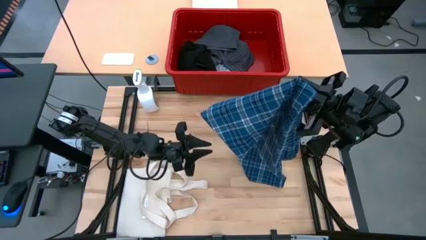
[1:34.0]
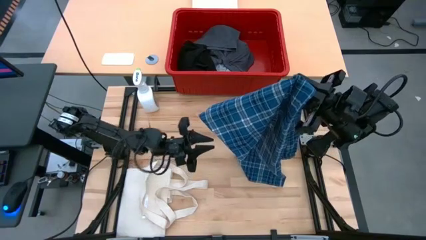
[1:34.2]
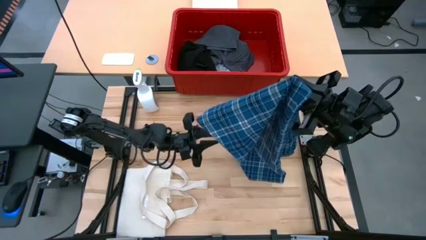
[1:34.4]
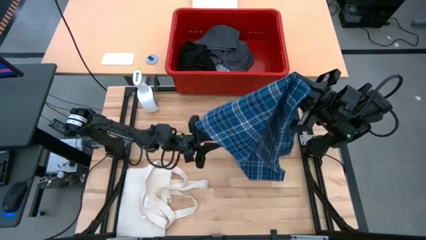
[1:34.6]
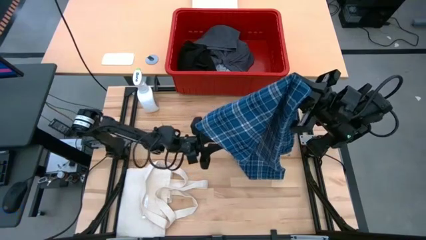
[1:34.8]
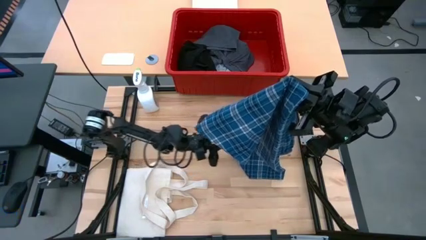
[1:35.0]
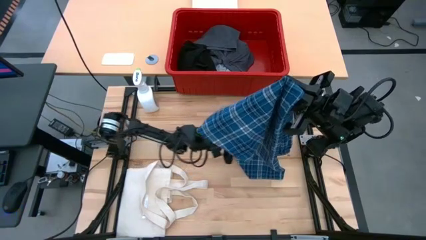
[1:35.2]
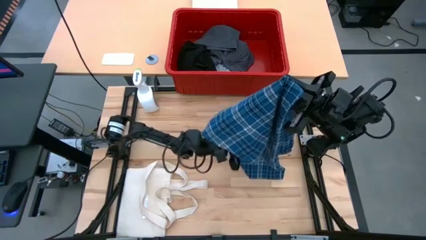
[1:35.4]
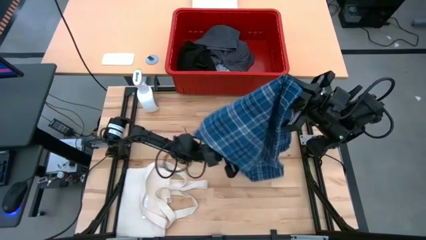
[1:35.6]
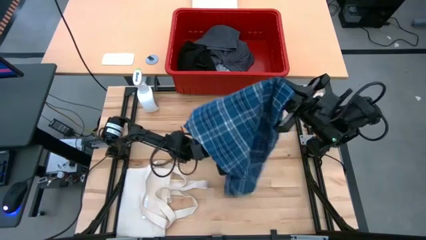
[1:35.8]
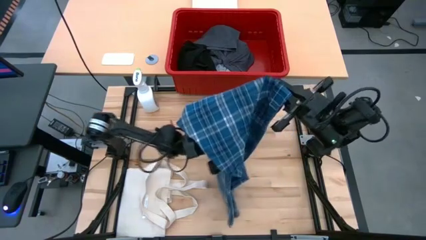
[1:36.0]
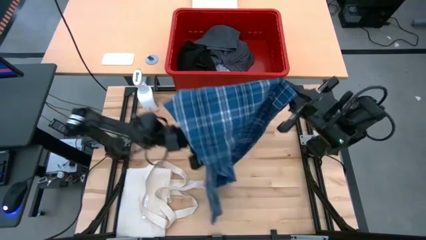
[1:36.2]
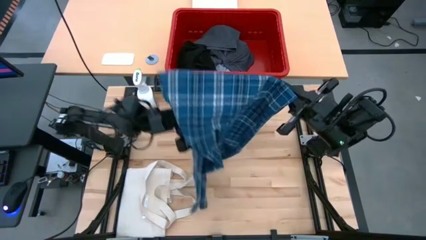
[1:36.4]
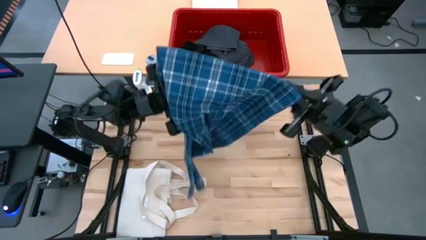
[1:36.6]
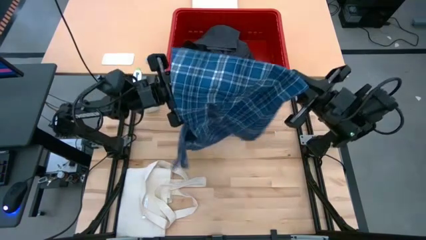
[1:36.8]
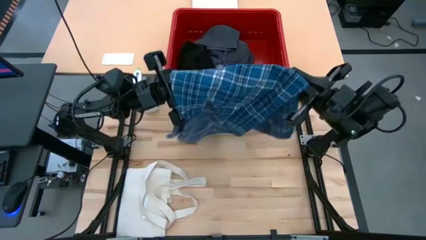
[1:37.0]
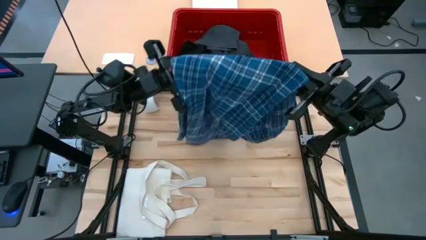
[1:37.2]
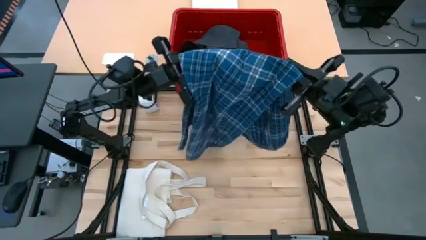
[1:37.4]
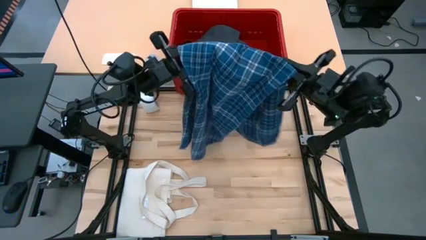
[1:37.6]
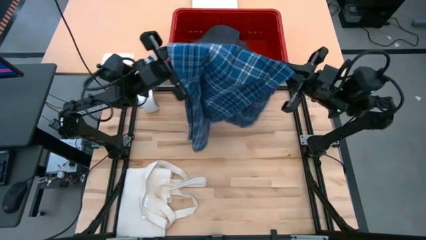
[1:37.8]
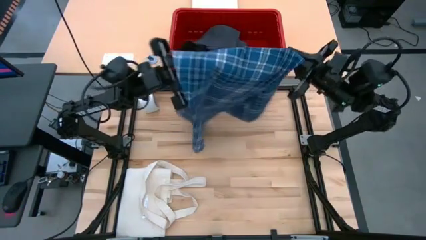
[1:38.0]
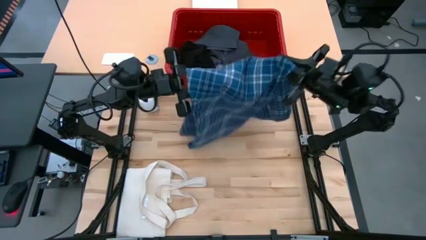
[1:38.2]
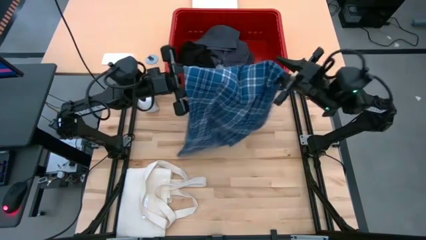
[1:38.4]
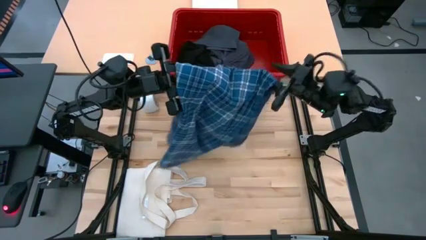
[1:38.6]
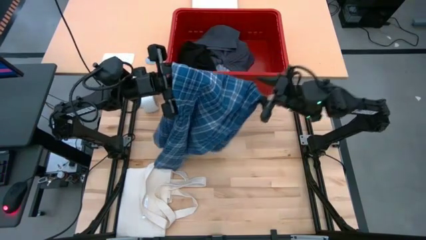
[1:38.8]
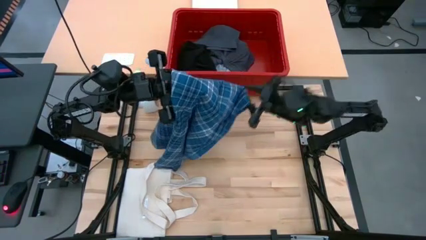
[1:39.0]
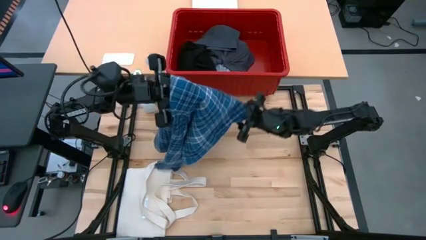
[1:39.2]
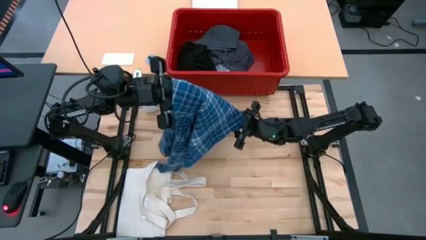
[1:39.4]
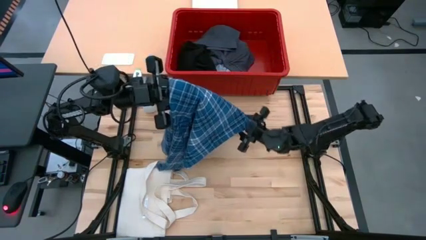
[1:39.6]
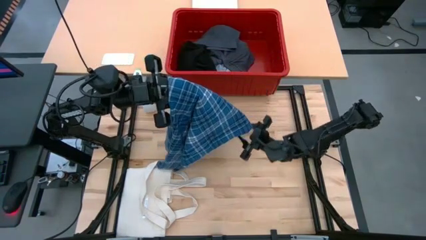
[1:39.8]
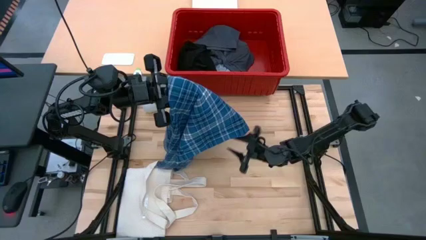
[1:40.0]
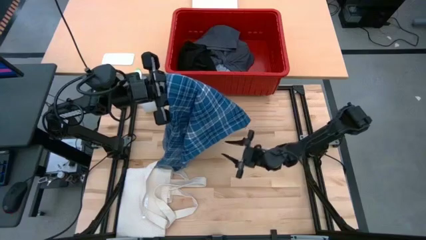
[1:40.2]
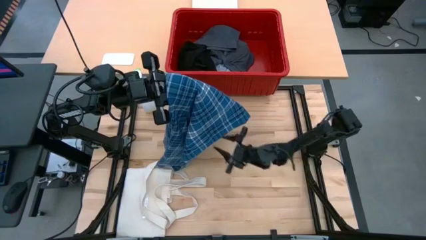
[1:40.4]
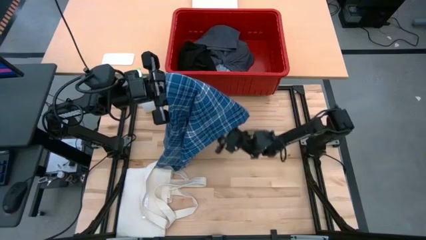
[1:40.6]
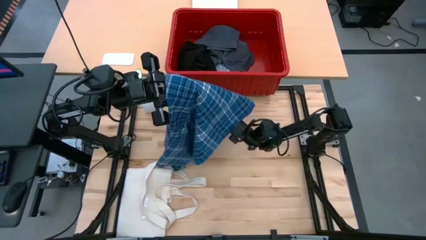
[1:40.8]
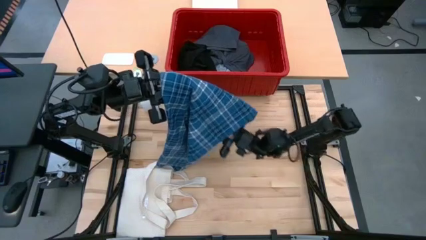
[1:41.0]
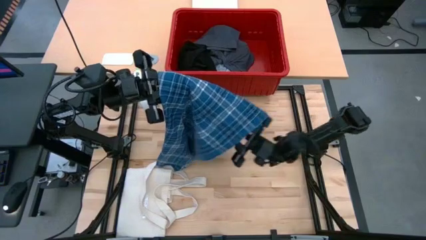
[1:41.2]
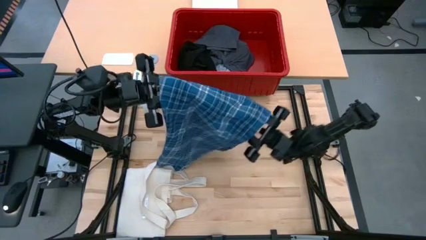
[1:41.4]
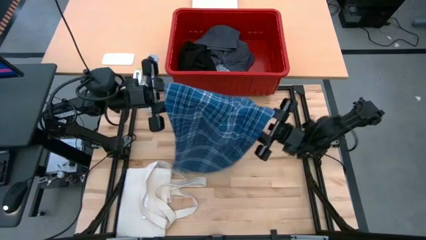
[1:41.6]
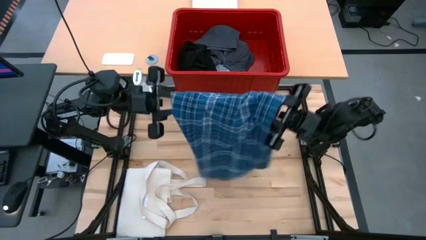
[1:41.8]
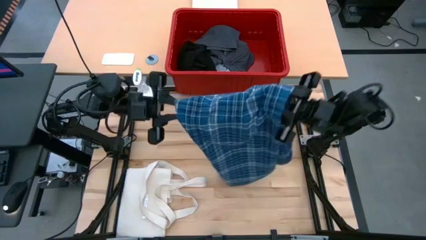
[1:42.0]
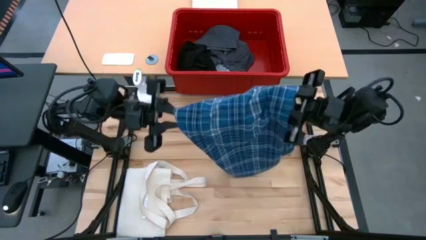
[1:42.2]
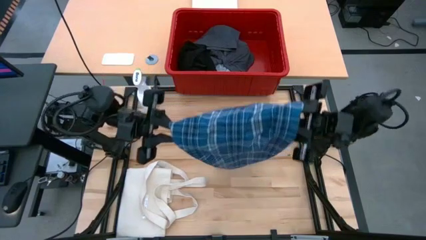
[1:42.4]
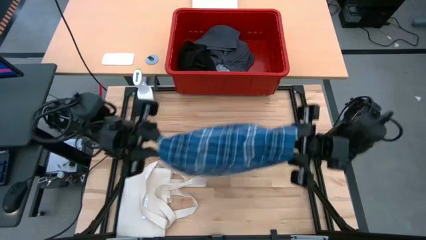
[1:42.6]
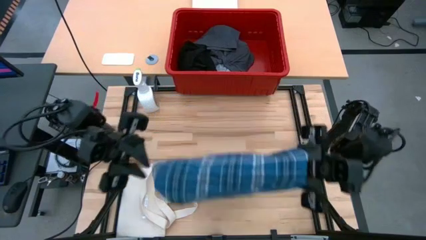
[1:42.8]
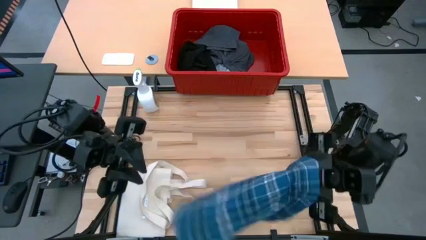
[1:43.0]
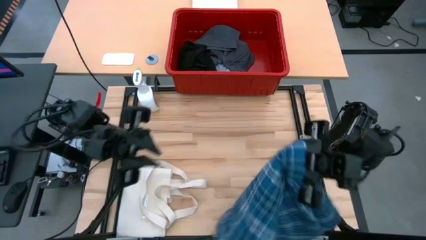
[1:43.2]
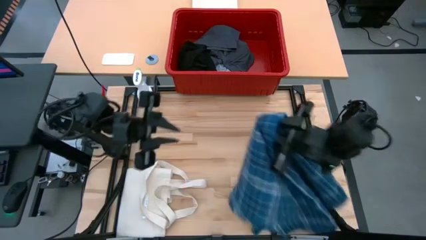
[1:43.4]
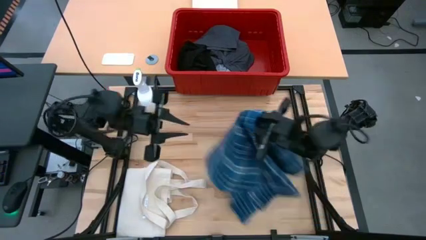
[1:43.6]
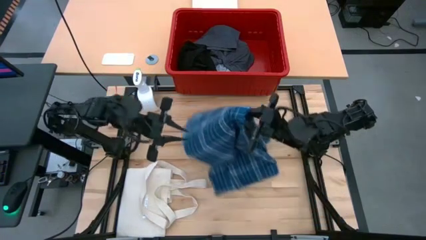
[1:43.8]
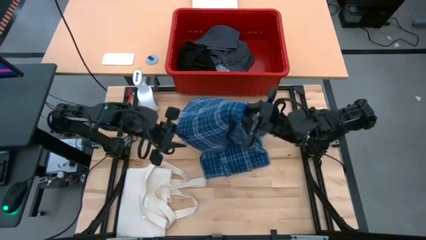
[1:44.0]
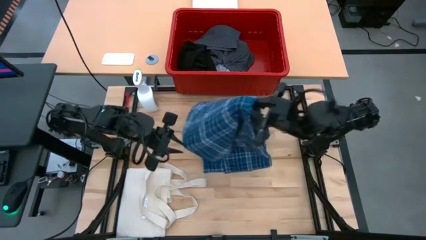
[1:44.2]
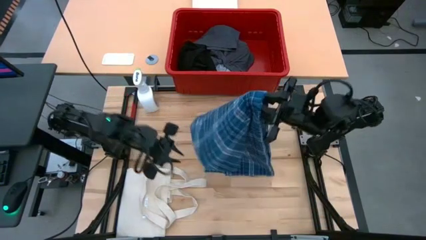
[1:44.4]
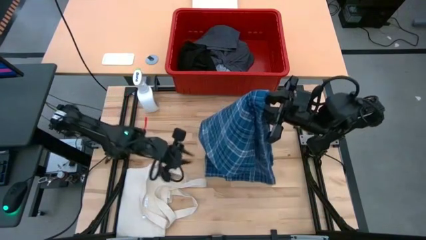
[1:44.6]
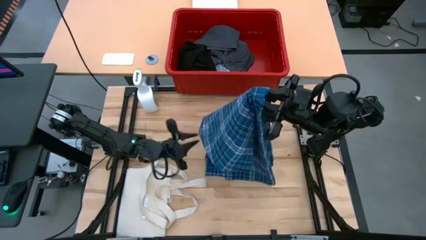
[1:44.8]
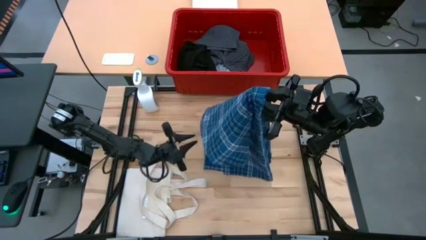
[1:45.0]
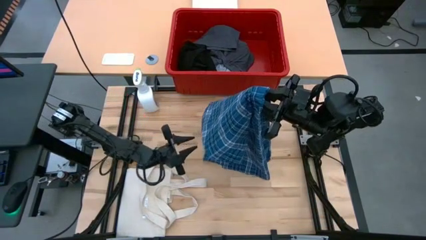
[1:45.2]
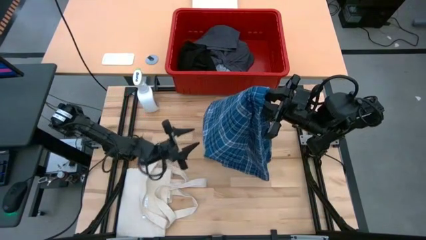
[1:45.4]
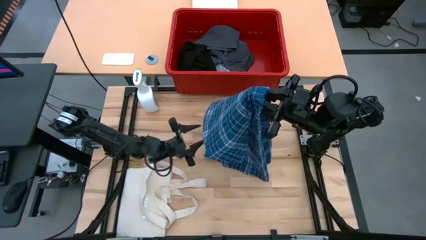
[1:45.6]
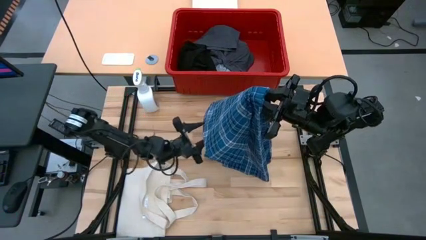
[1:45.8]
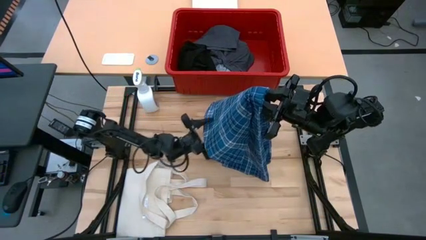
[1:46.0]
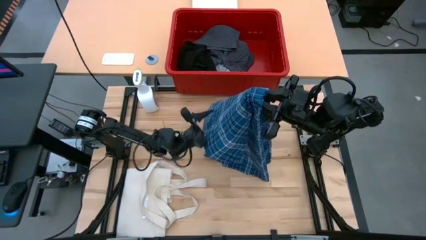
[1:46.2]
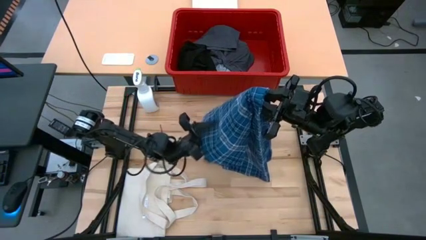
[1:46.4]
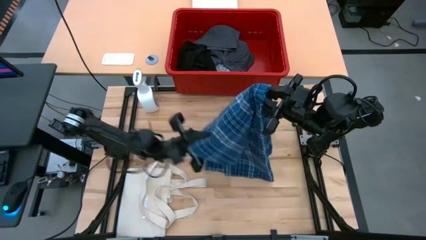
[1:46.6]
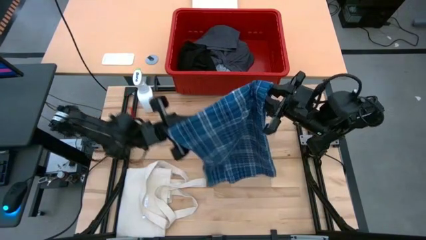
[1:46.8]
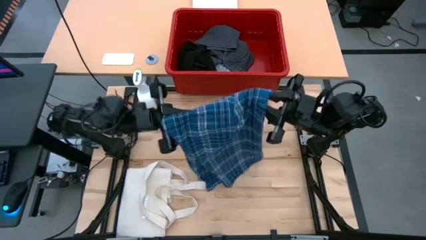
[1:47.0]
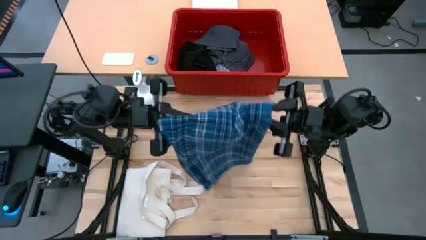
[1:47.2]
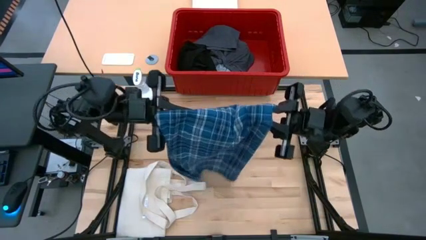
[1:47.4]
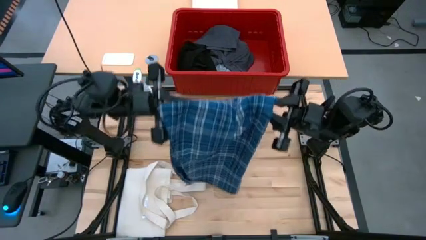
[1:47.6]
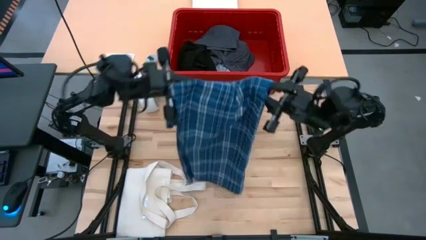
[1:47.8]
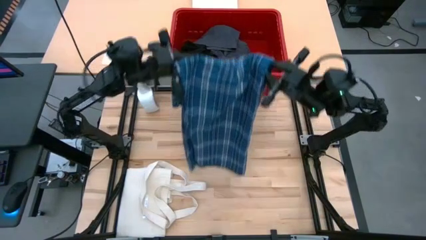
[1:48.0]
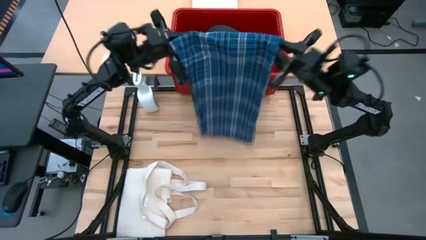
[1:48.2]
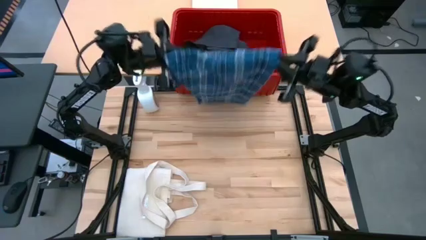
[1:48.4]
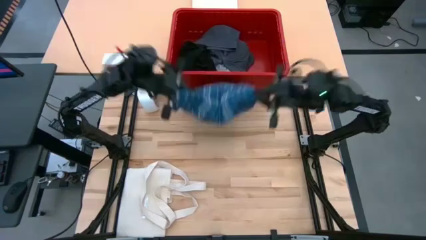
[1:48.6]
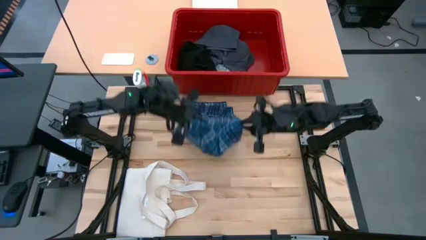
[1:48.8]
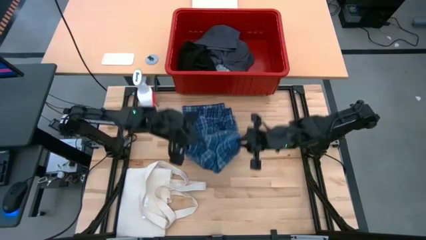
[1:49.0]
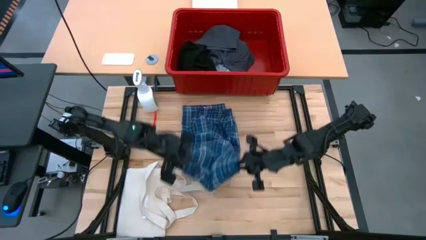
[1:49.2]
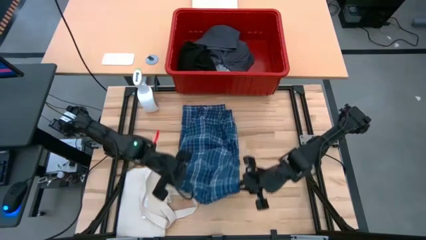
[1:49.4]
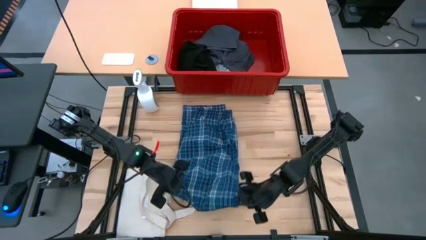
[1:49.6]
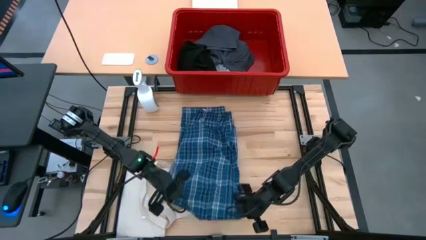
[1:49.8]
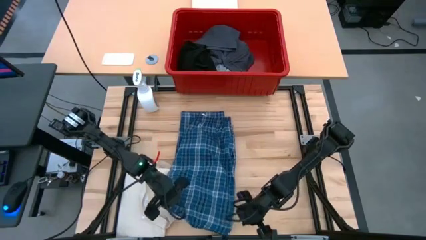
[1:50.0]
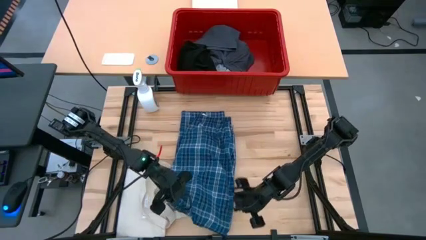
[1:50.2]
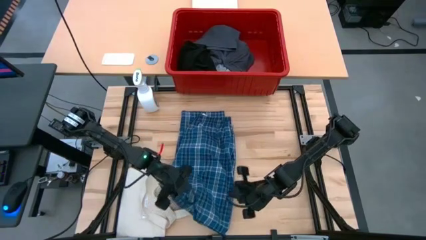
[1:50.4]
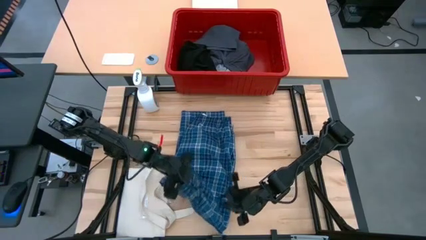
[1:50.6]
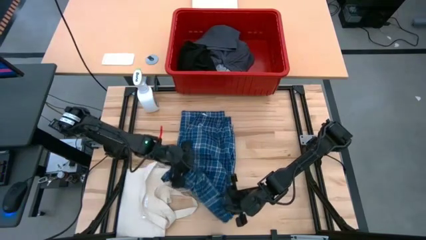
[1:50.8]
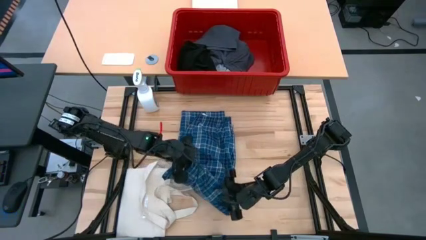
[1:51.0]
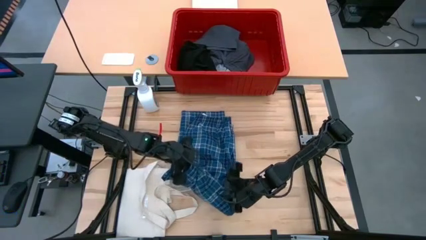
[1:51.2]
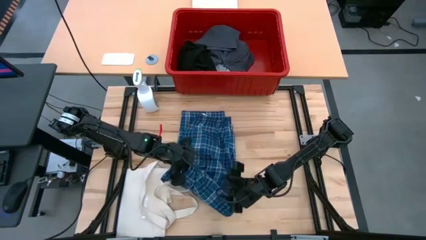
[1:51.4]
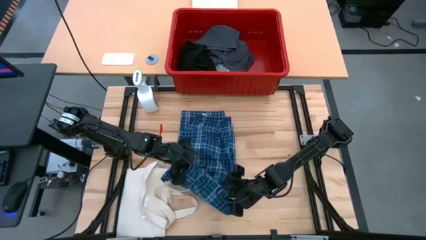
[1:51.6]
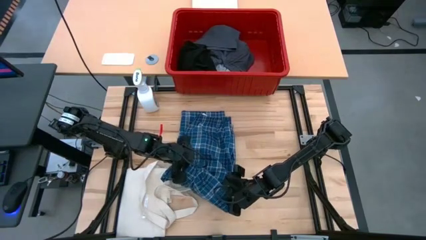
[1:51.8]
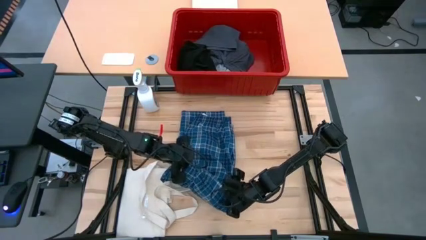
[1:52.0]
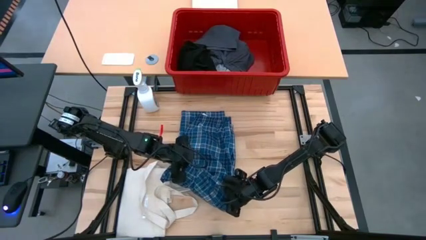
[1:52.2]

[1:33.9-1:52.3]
Task: Fold Laundry from Bin
Fold the blue pants
